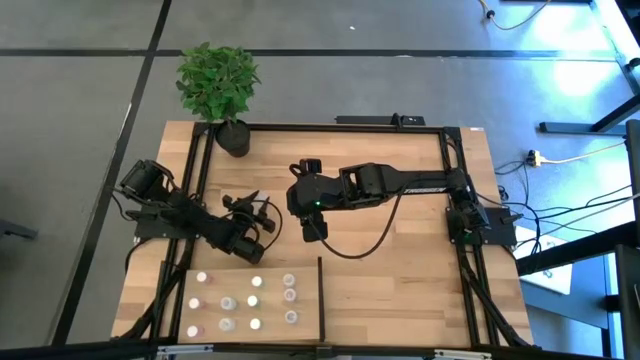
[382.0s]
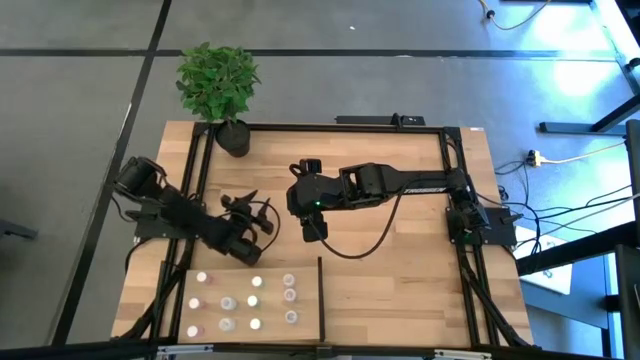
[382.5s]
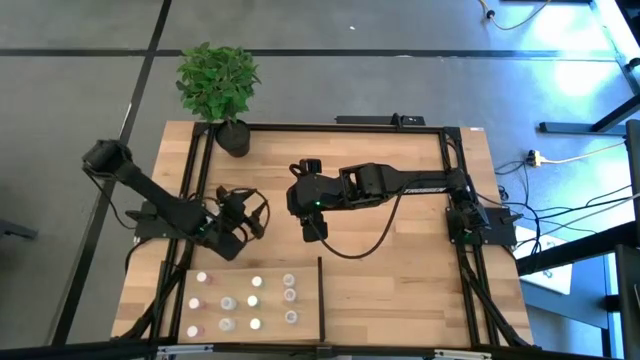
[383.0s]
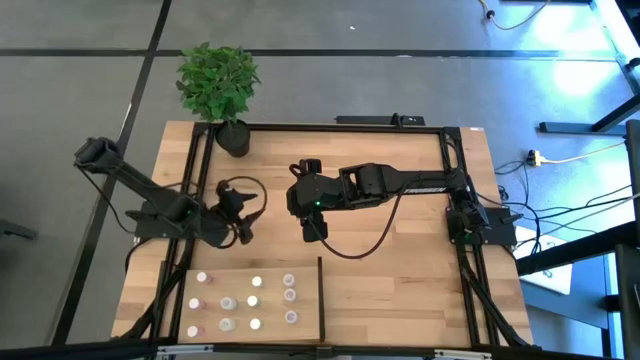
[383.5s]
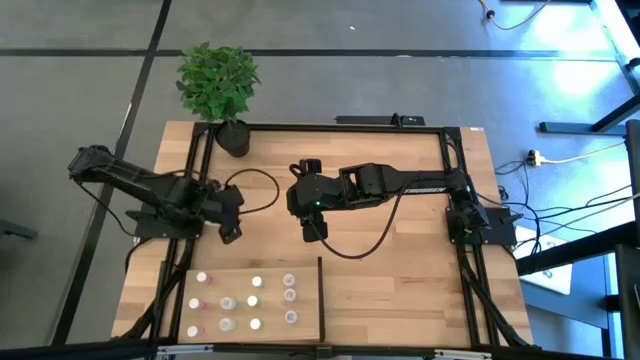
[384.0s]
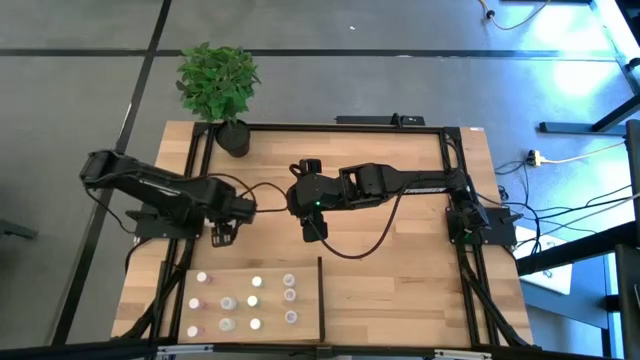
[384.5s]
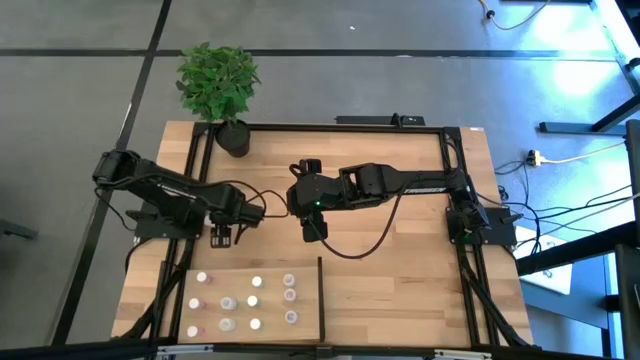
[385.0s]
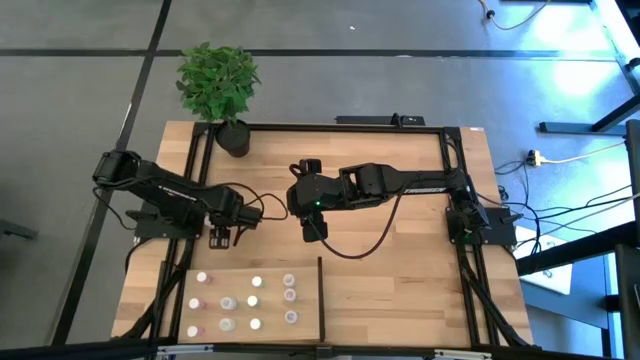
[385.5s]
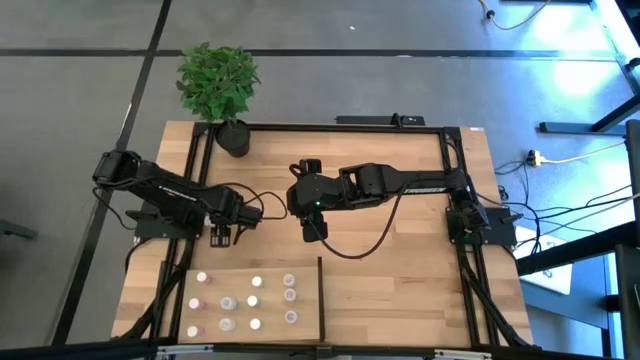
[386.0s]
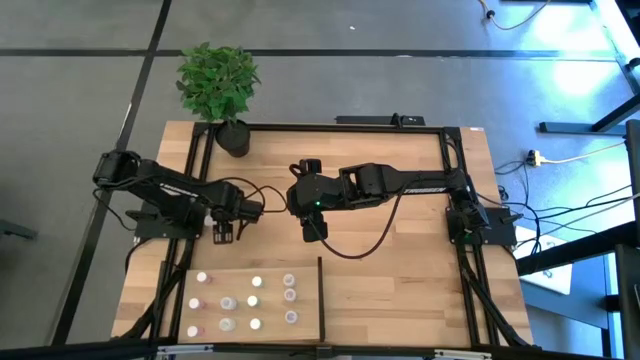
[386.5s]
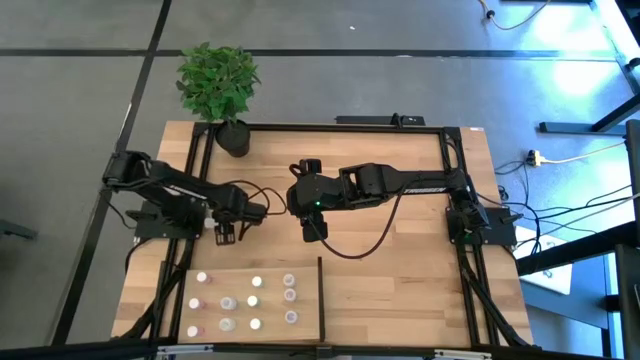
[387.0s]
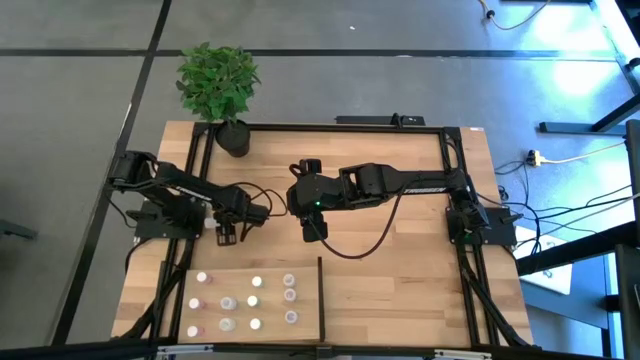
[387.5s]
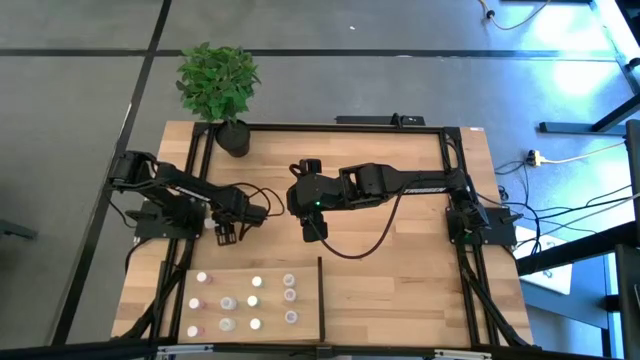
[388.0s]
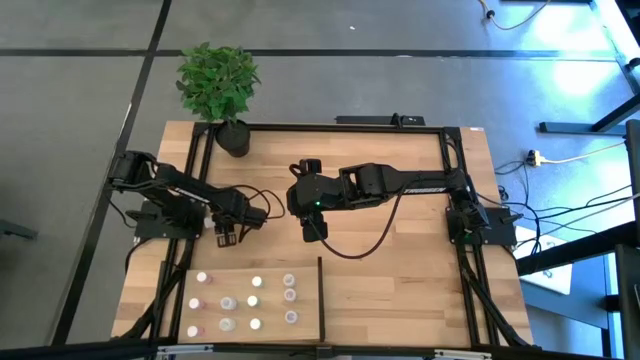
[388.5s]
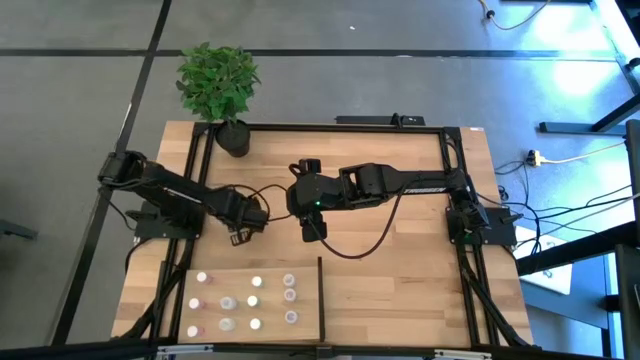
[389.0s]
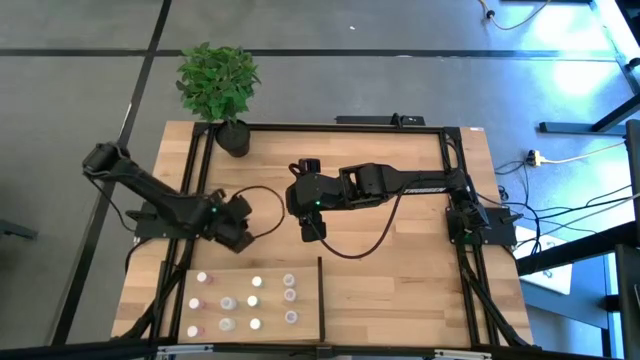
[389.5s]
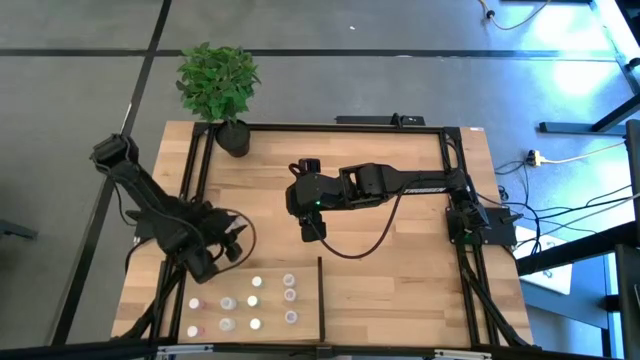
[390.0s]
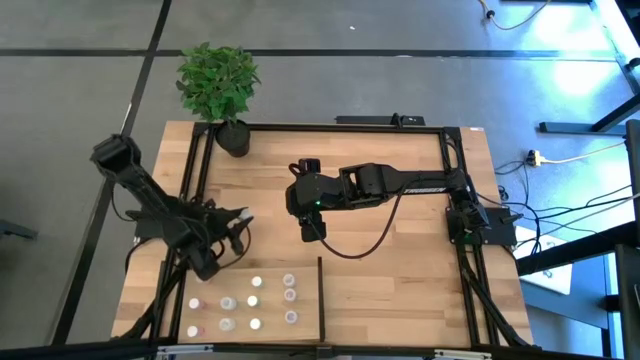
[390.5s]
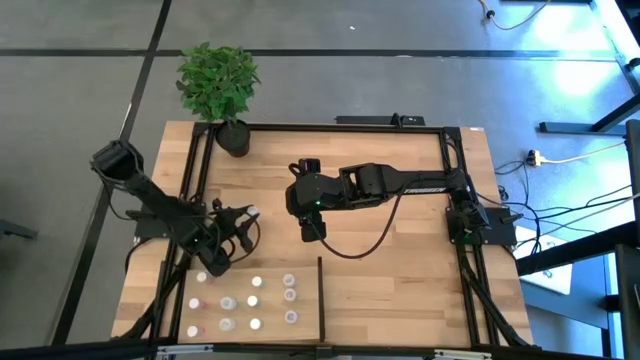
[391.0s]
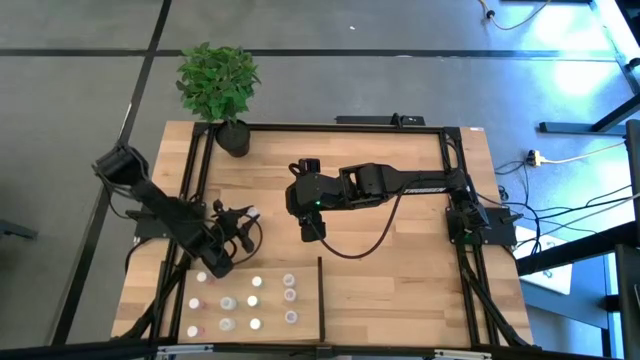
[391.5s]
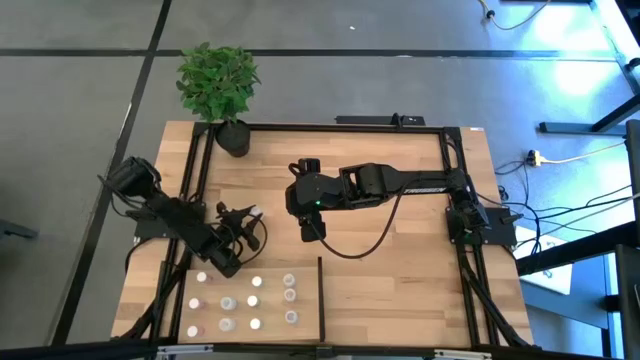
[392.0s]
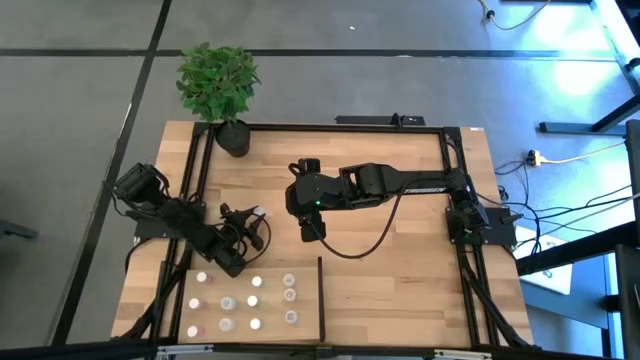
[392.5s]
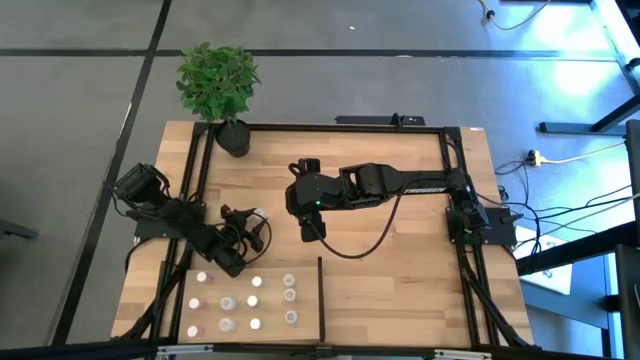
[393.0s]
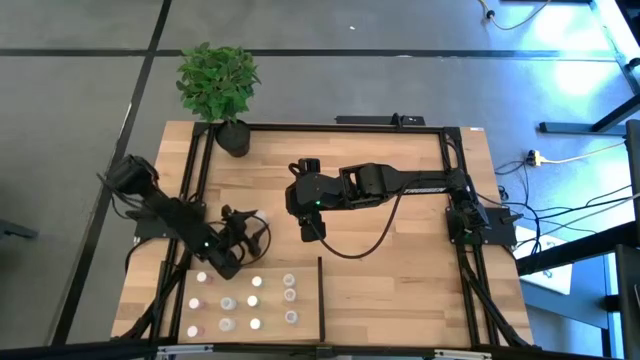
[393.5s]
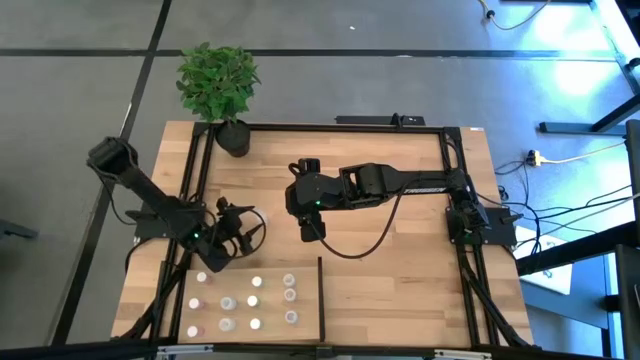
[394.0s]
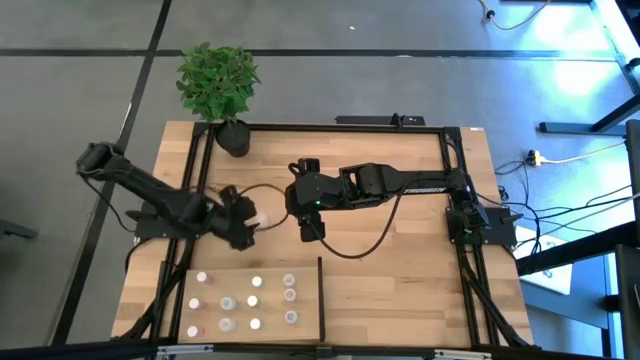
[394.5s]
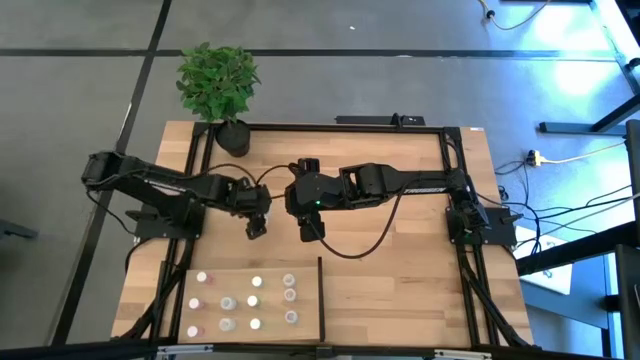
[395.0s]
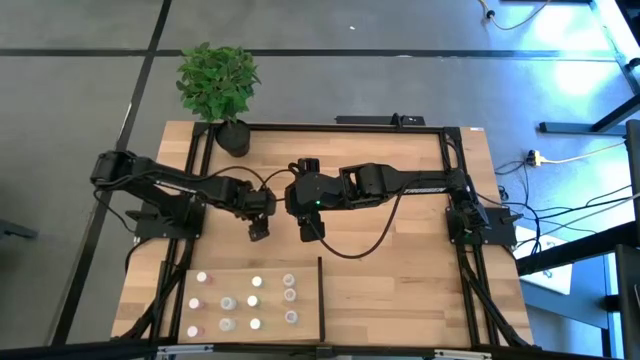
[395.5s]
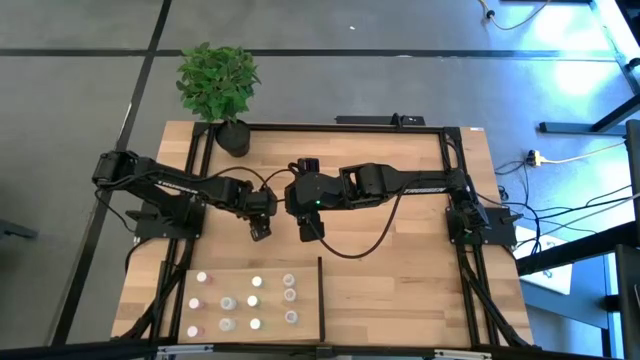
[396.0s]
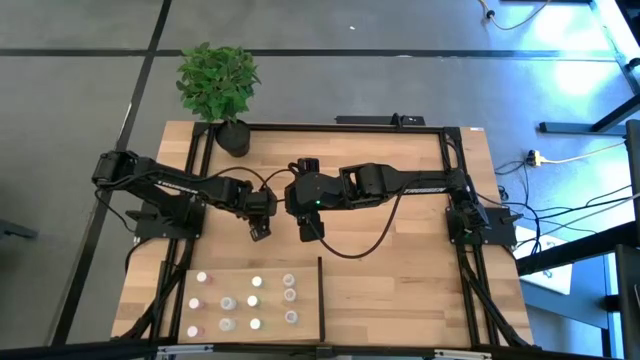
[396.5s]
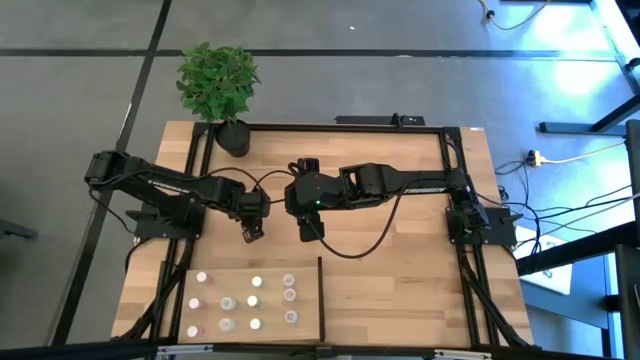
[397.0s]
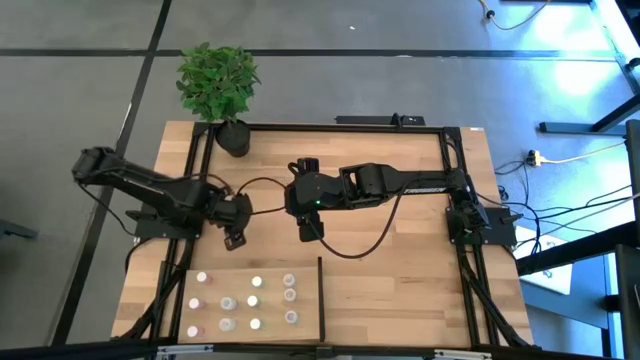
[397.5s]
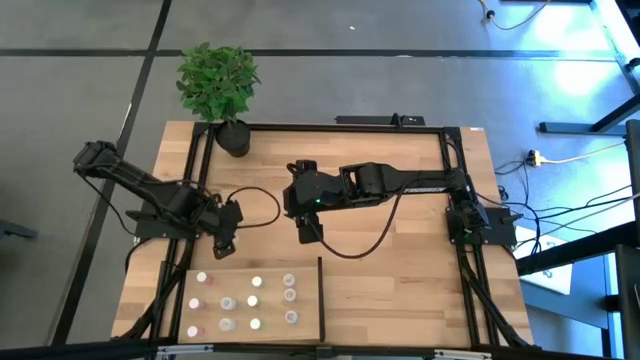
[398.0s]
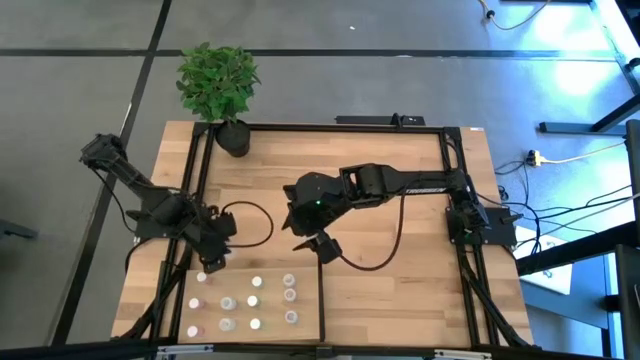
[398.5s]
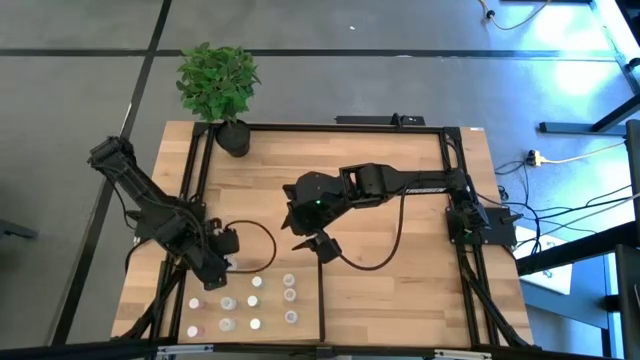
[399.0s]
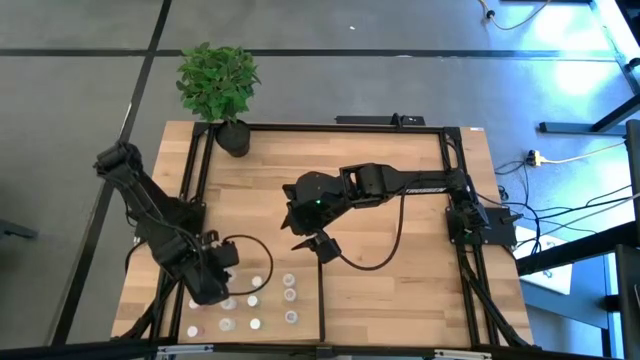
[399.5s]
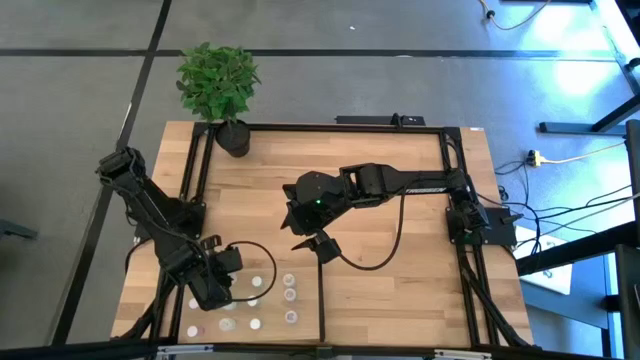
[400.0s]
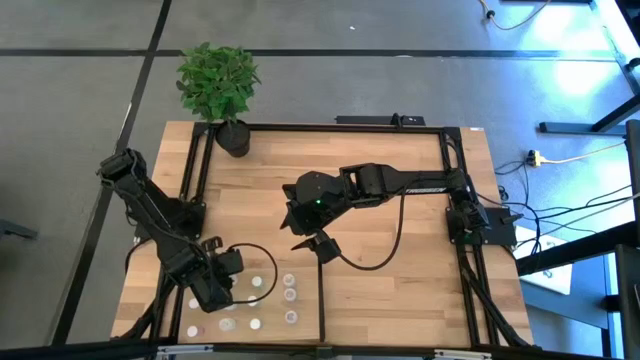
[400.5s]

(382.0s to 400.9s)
Task: Pick and place medicine bottles onto shelf by color
Put the white pill bottle on the shelf aligned with the other white pill bottles

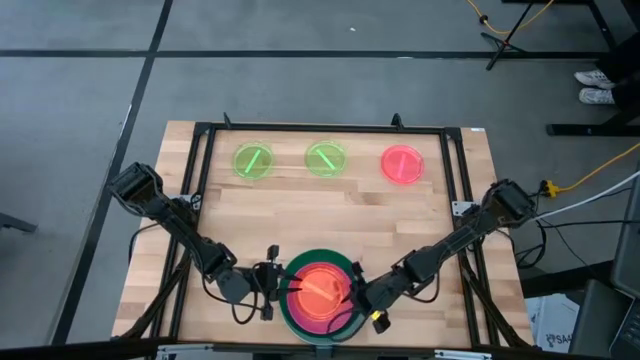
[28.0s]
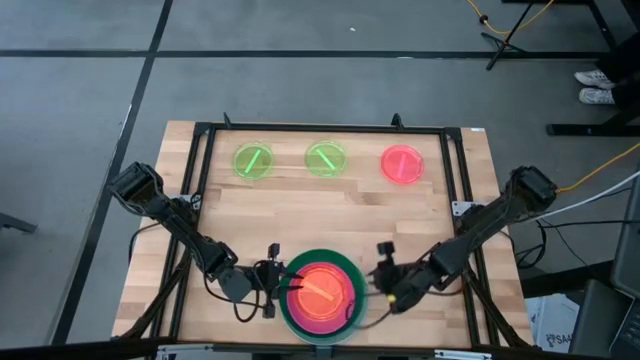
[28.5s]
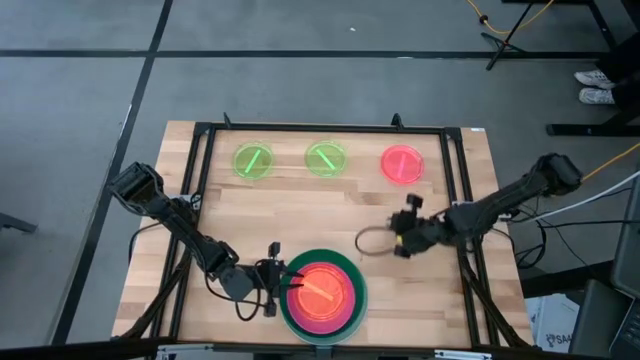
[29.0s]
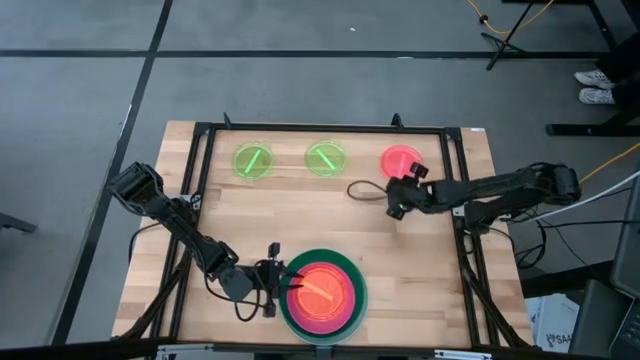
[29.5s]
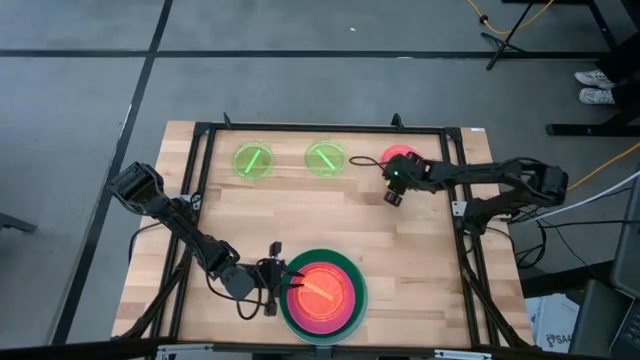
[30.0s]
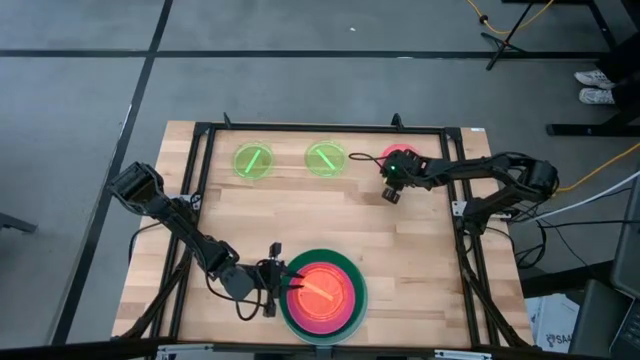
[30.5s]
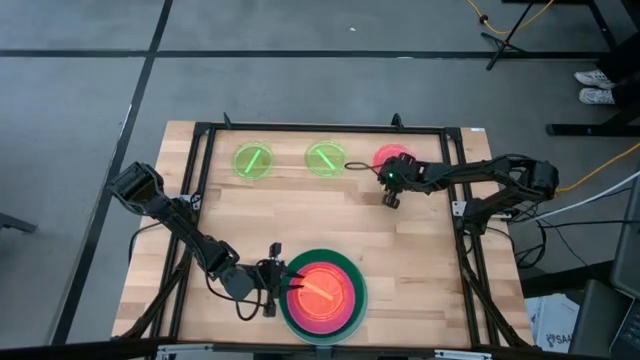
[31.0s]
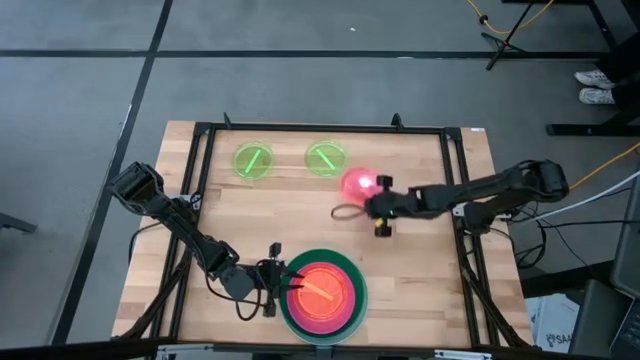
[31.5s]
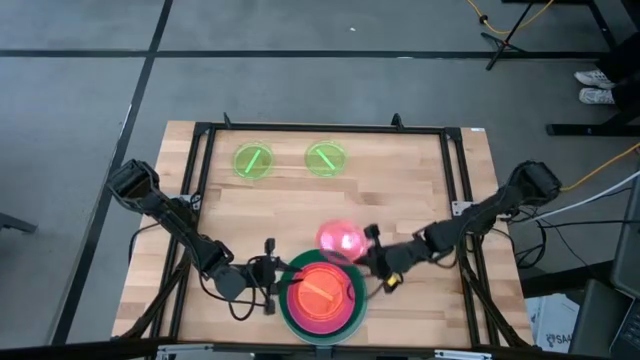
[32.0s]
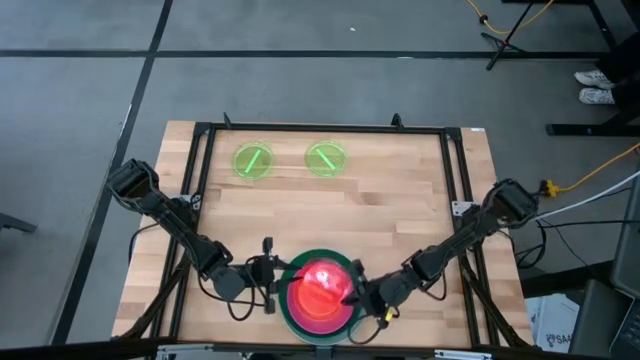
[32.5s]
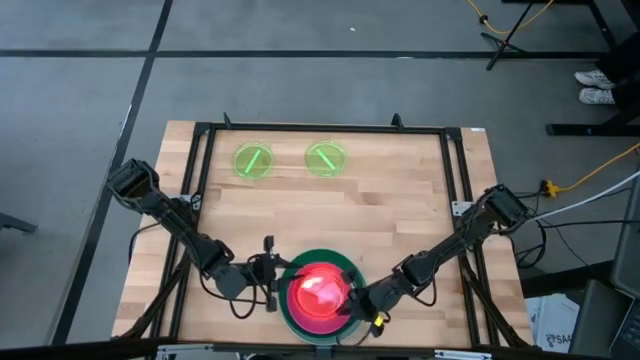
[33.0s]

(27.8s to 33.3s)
Task: Stack plastic plates
Stack the light pink plate on top of the orange plate
